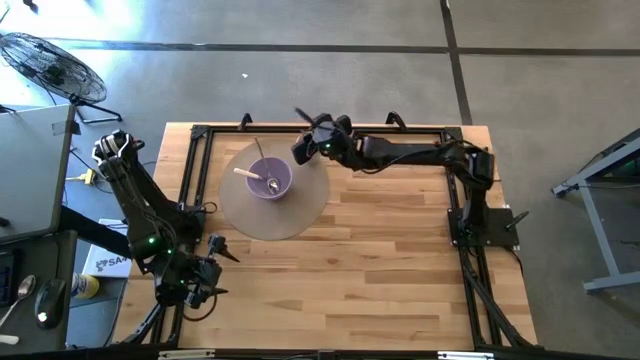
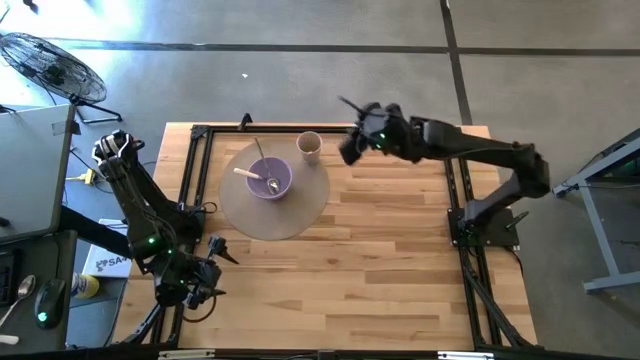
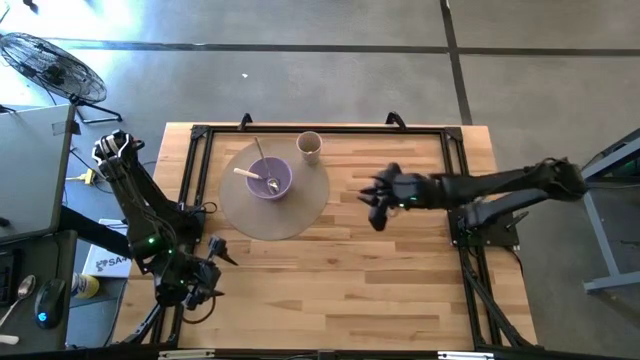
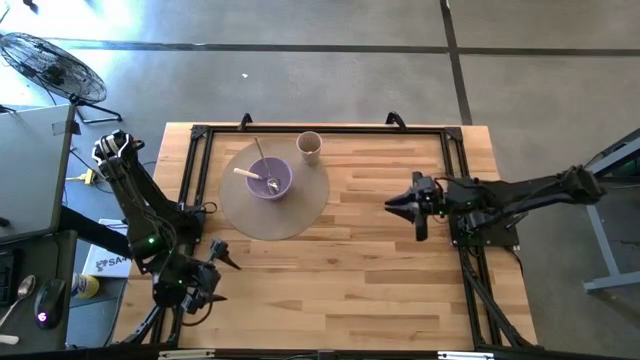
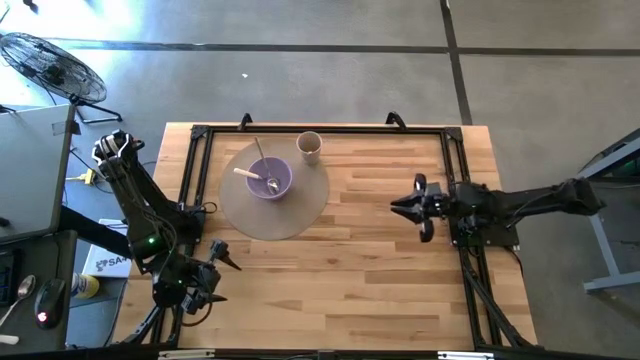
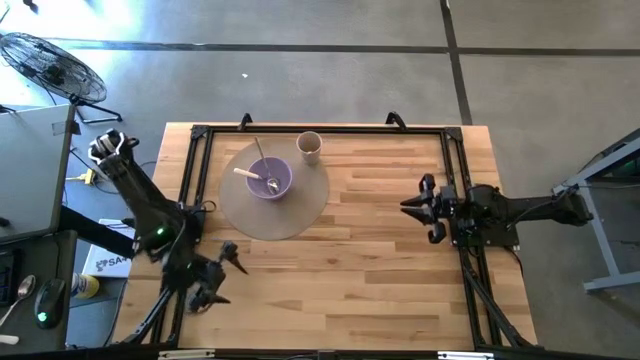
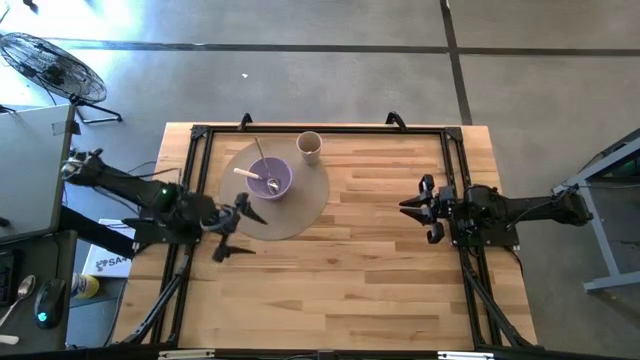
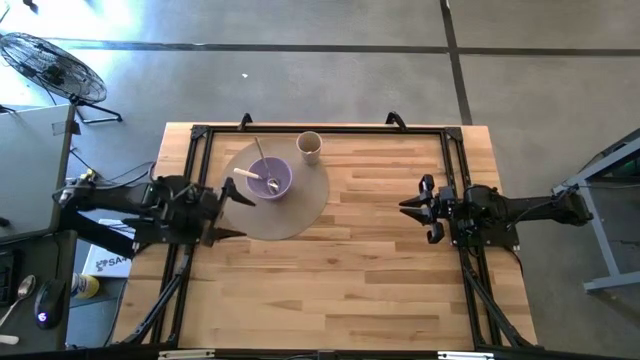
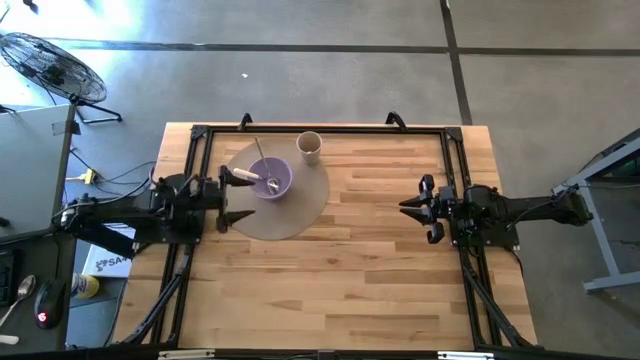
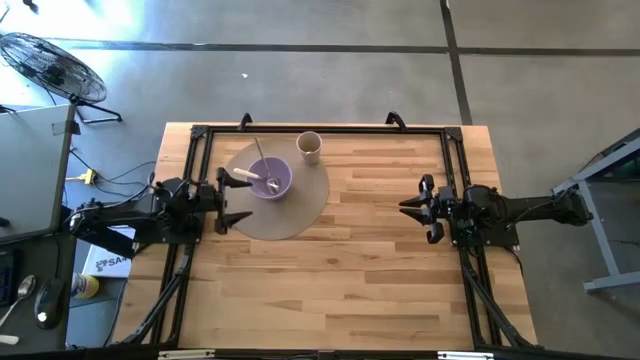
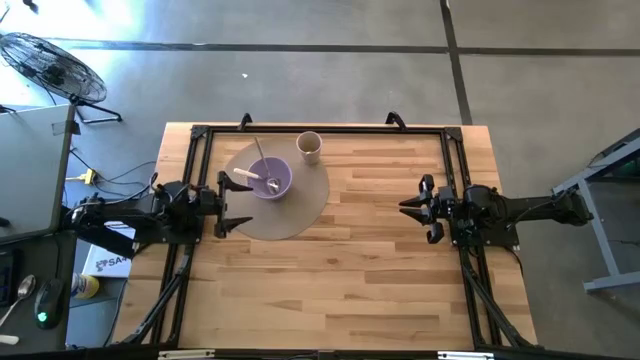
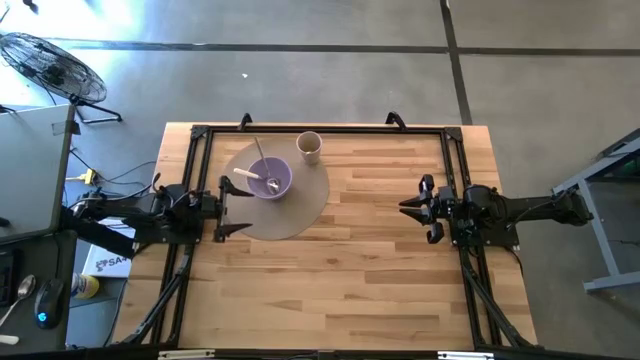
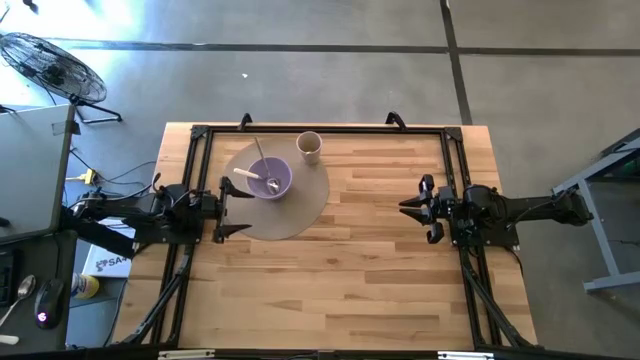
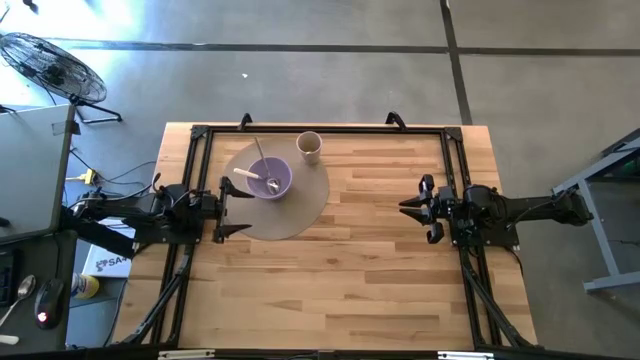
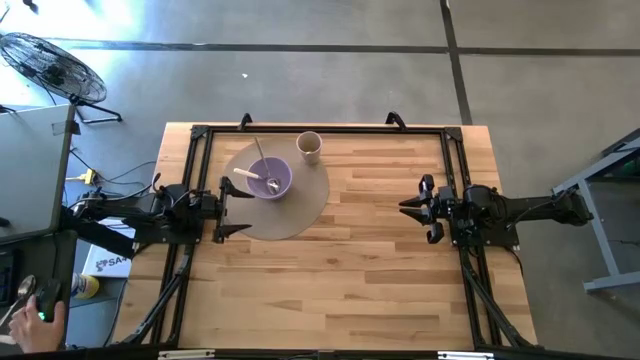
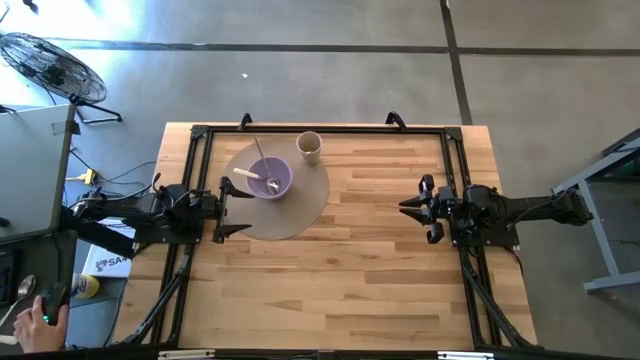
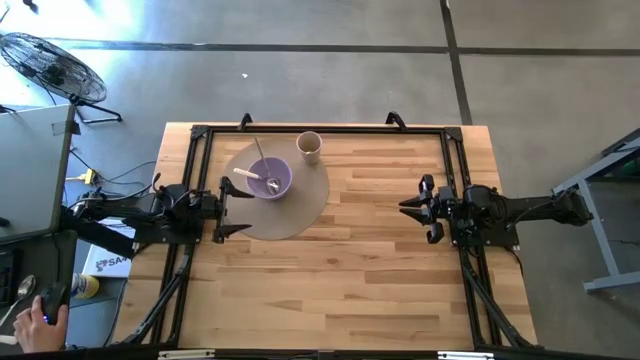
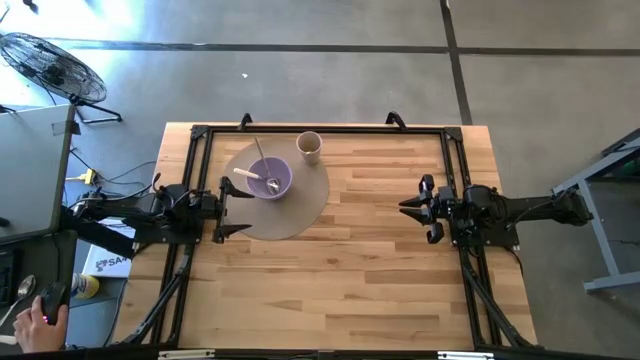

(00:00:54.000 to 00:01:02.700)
Task: Pick & Place Utensil
Return to Home Position

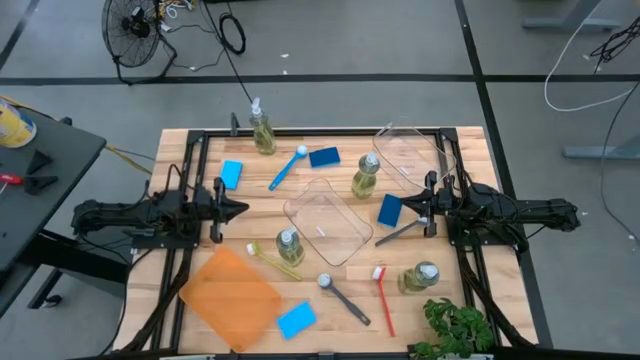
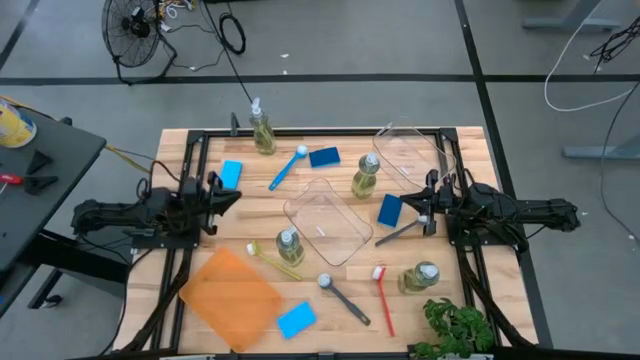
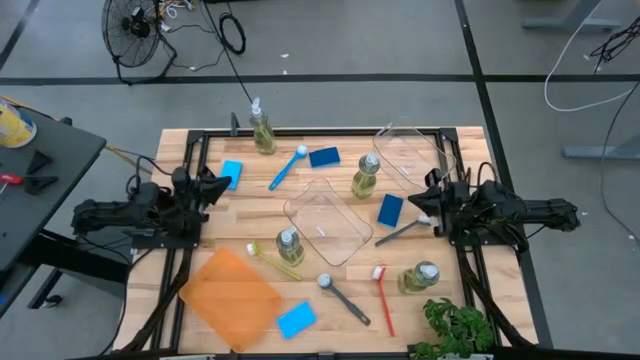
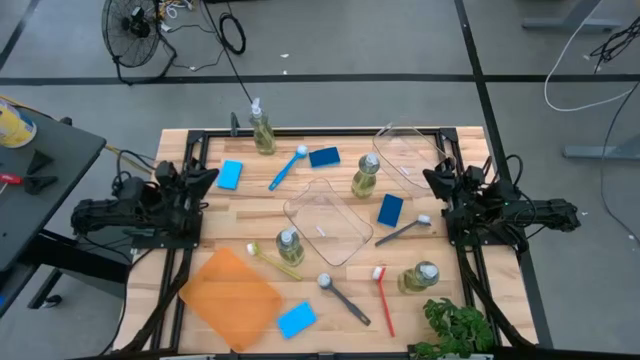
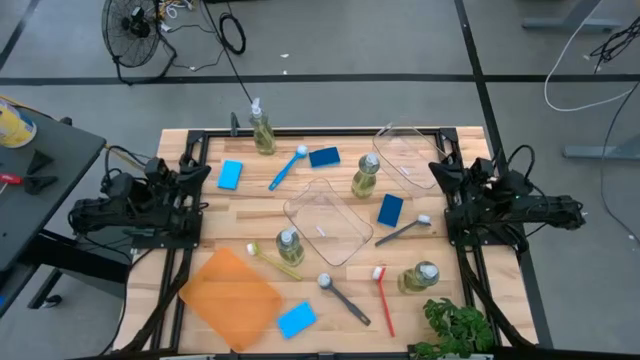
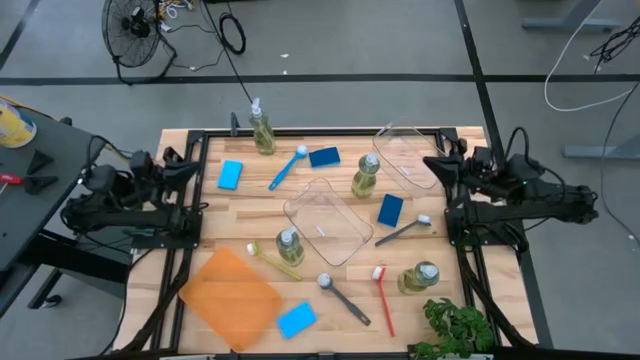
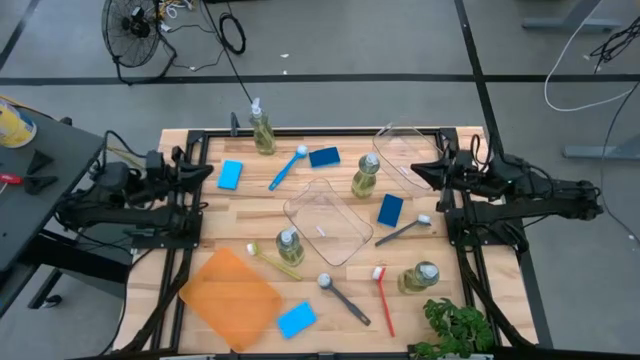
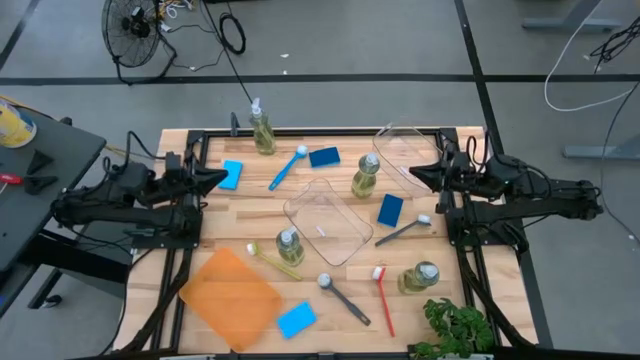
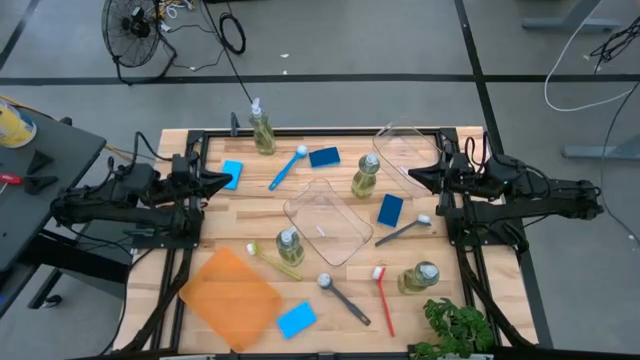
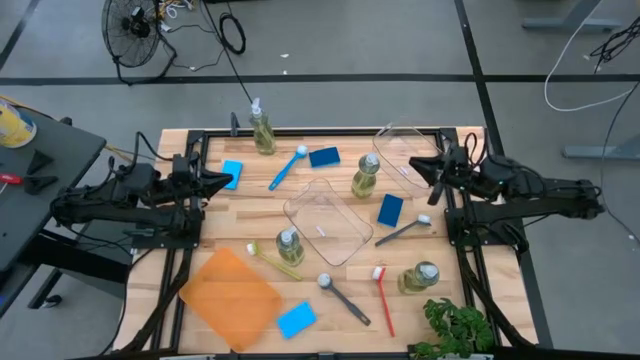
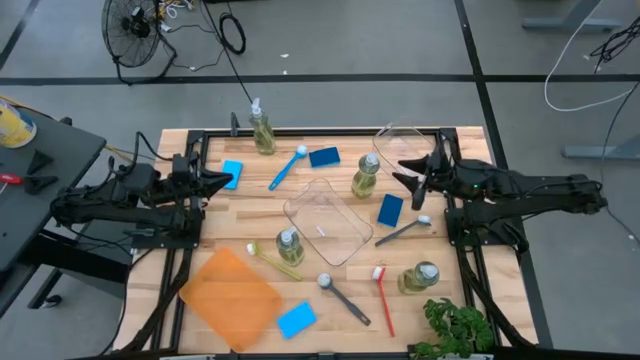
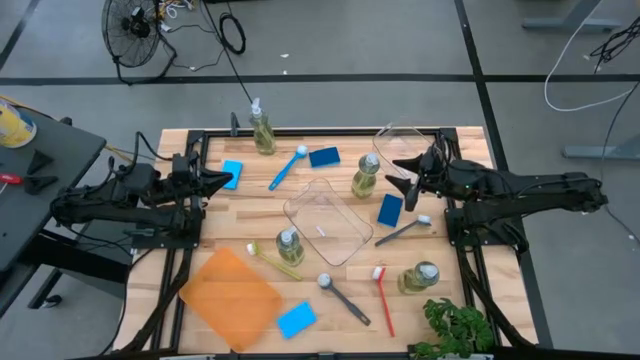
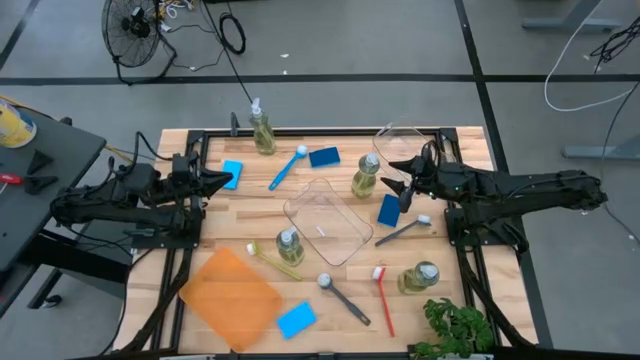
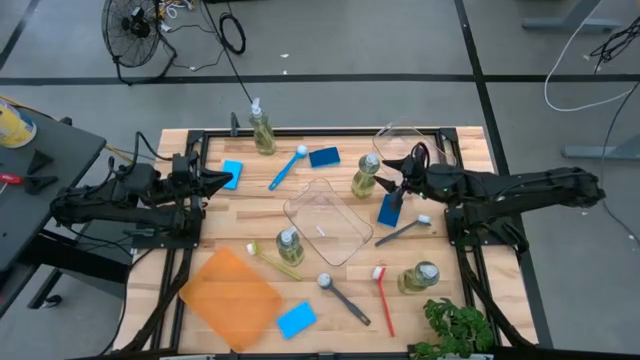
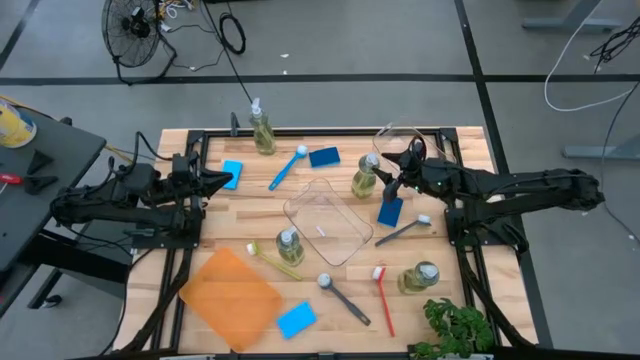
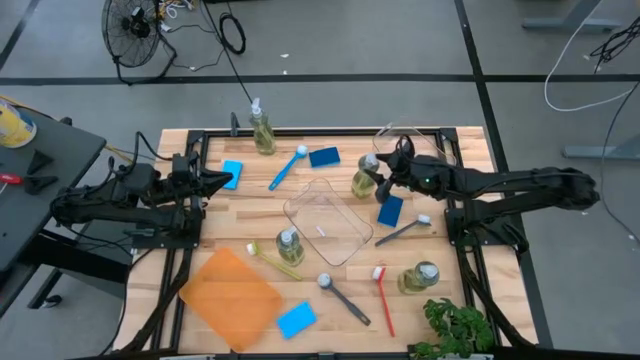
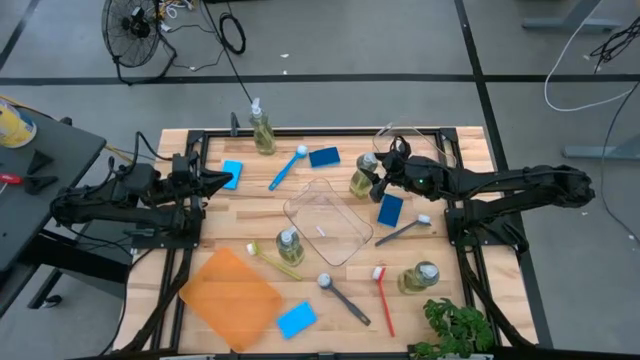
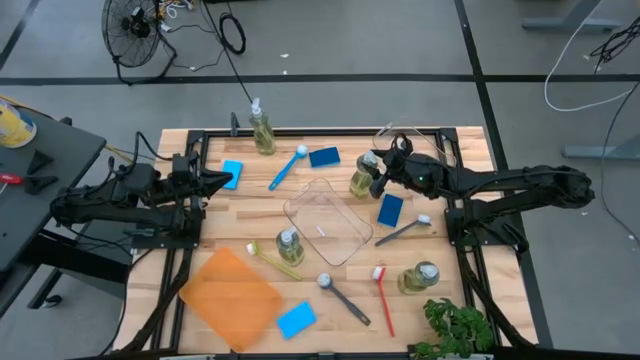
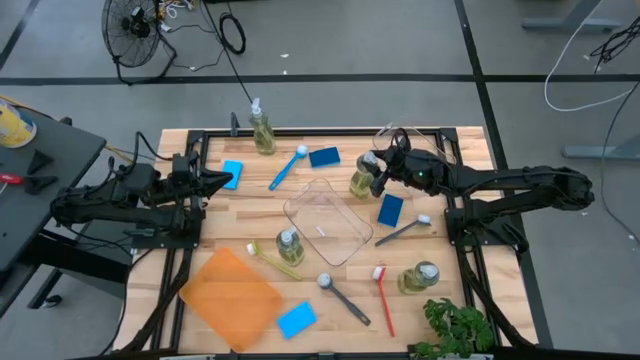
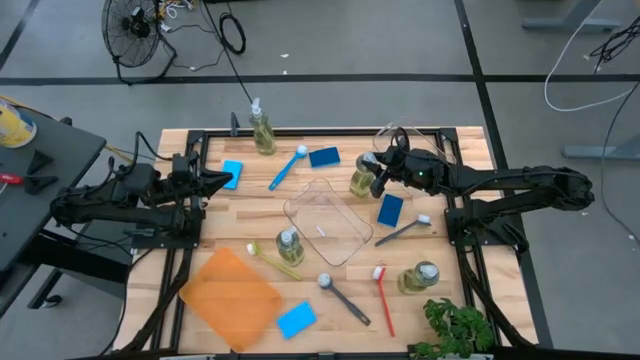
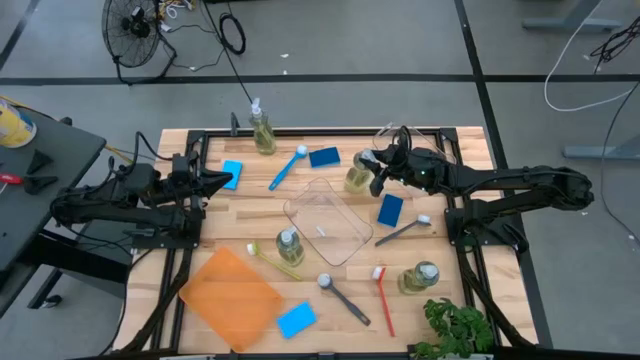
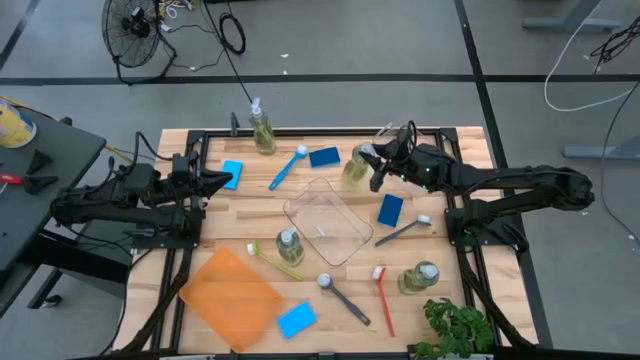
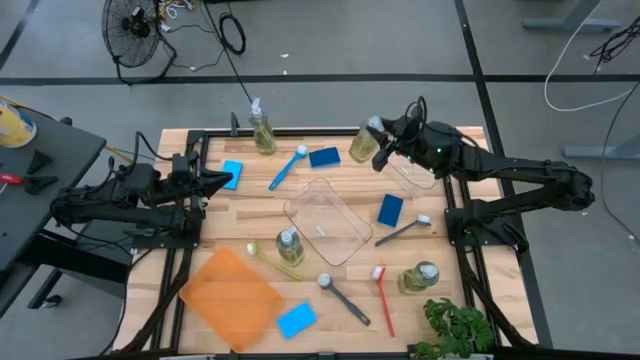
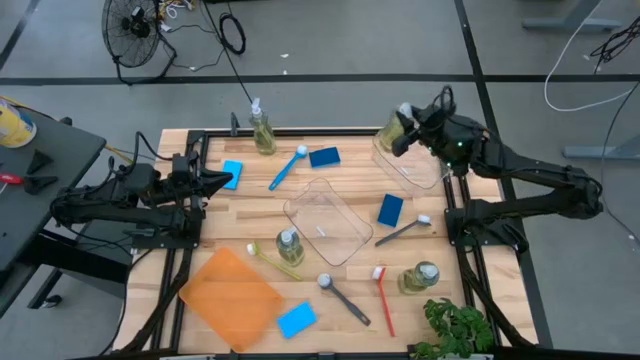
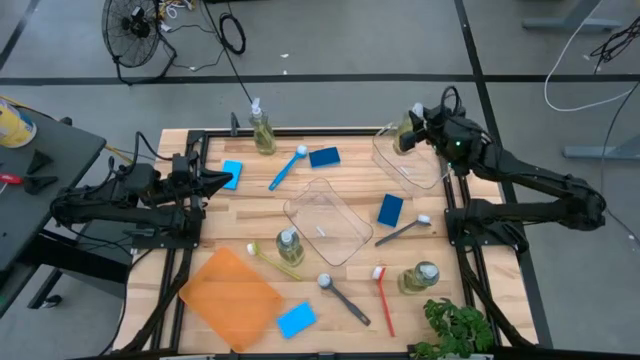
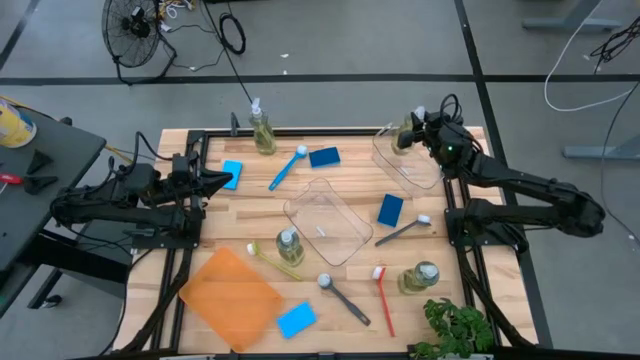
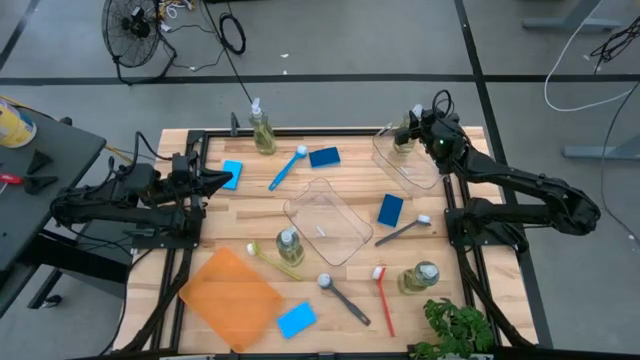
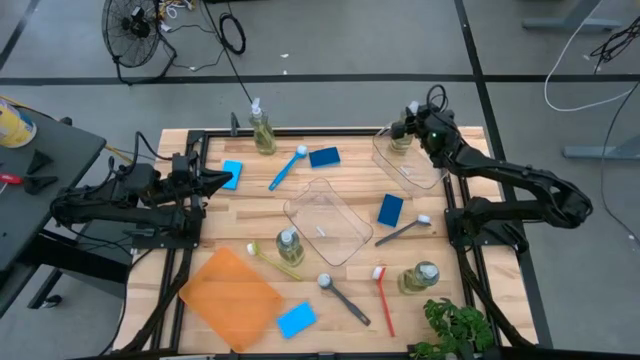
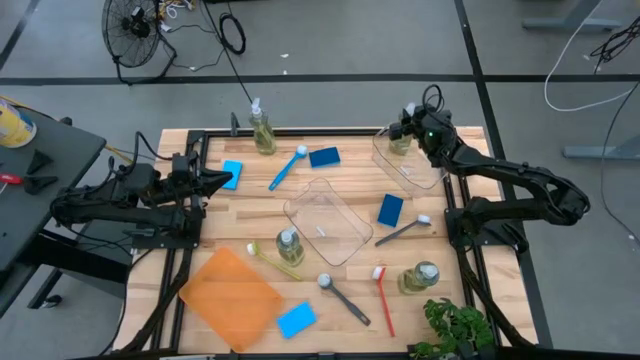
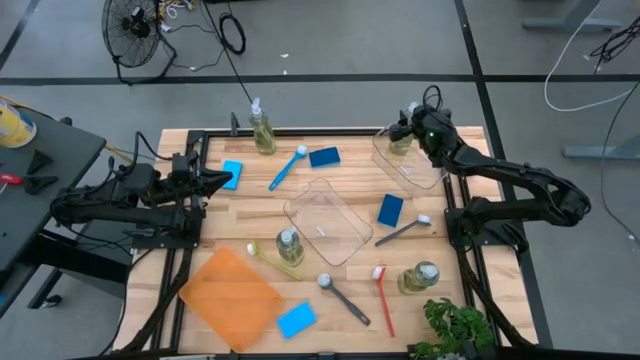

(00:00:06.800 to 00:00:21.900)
Task: Pick & Place Kitchen Sink Supplies
Put the yellow dish soap into the top transparent bin
